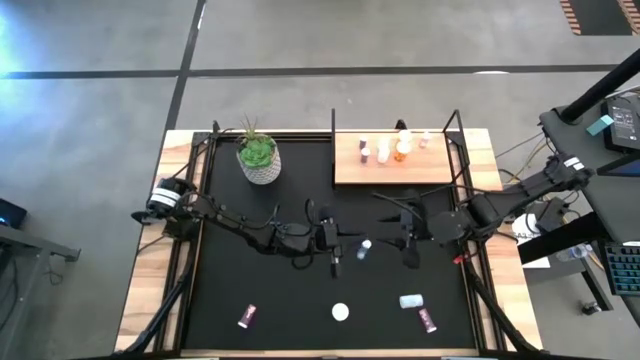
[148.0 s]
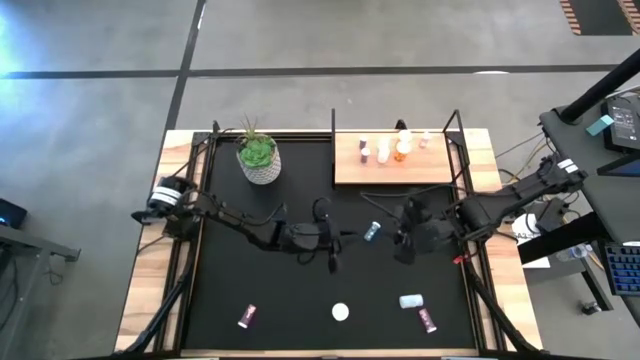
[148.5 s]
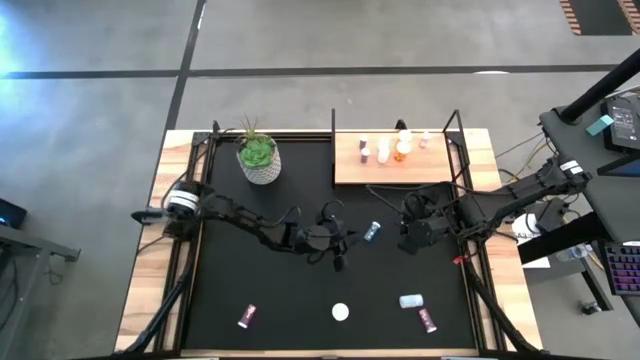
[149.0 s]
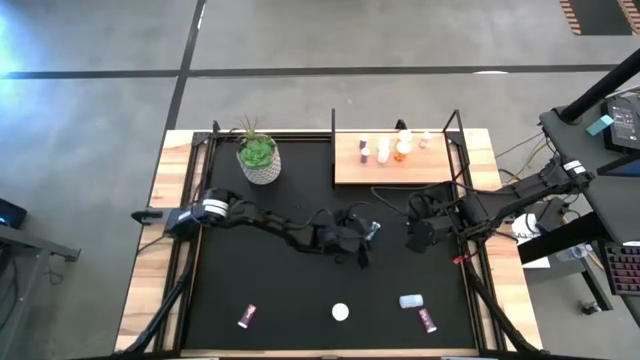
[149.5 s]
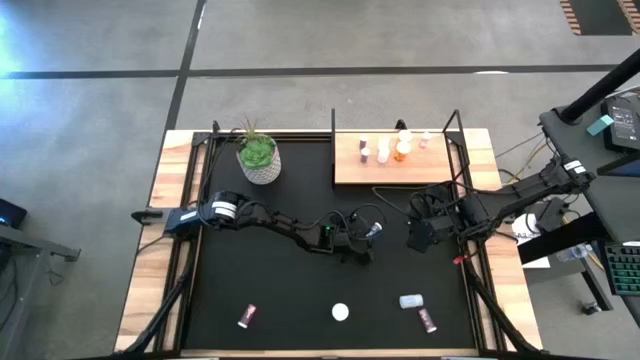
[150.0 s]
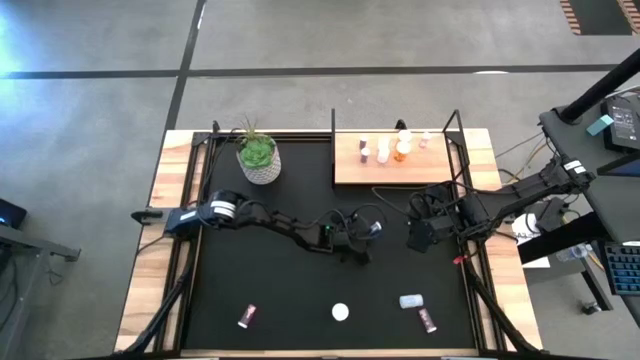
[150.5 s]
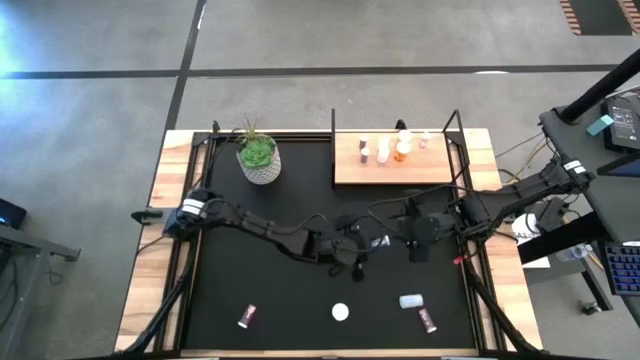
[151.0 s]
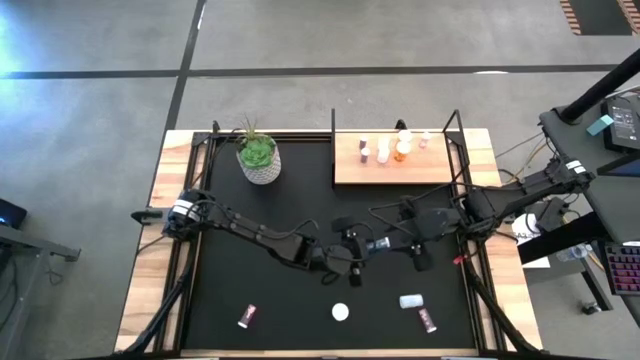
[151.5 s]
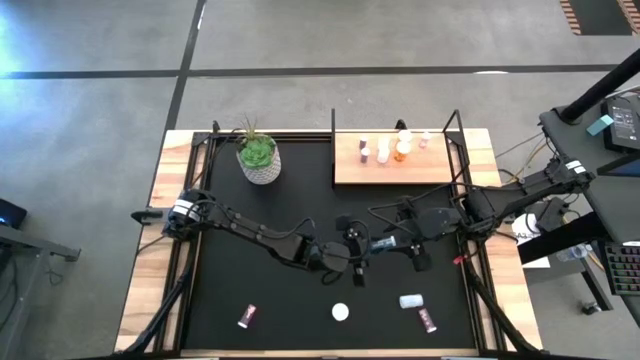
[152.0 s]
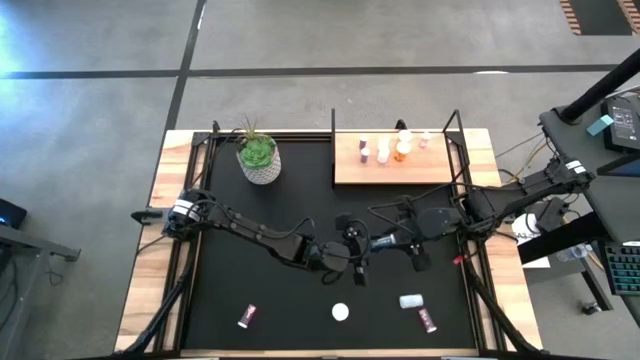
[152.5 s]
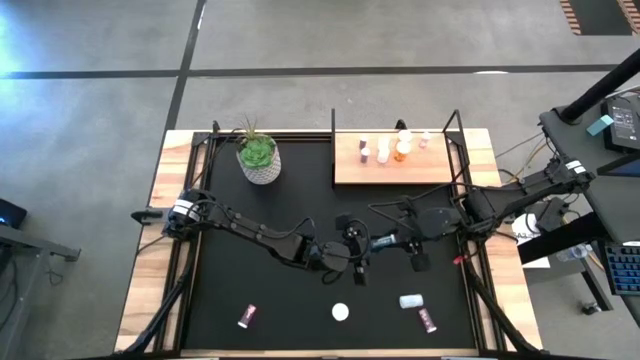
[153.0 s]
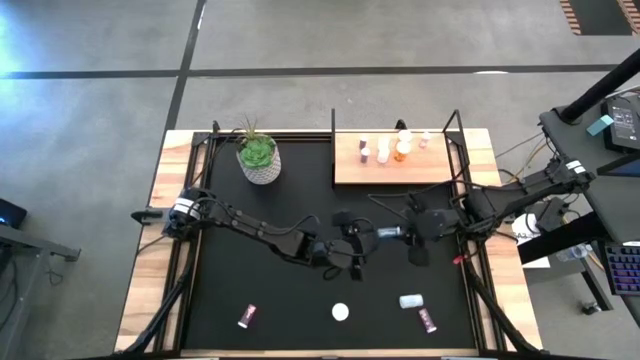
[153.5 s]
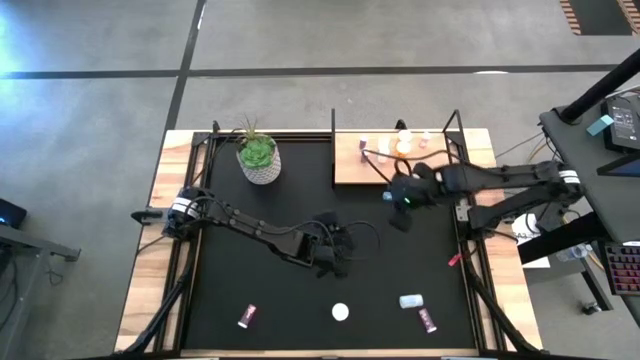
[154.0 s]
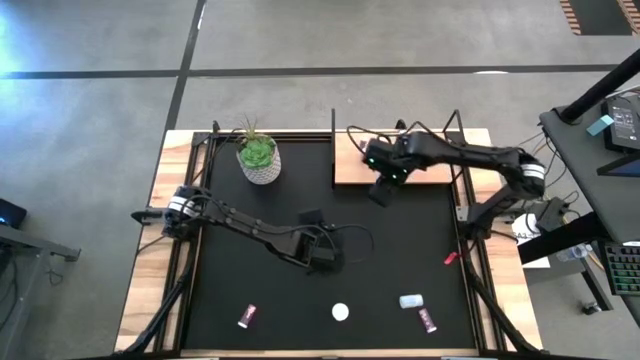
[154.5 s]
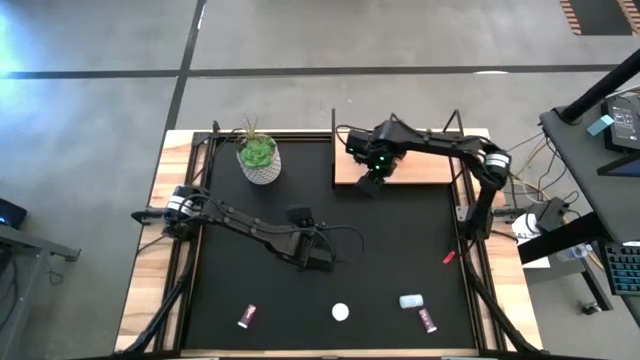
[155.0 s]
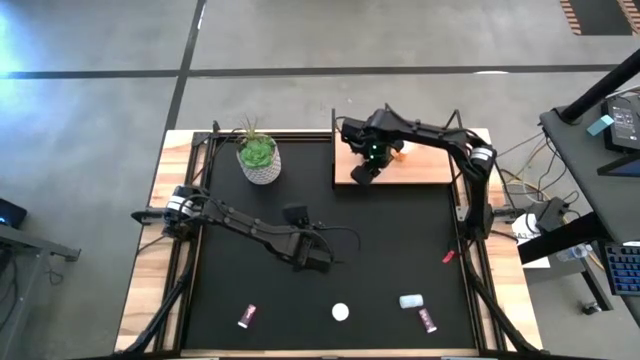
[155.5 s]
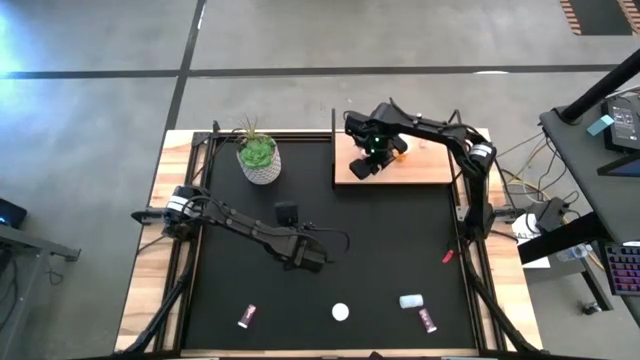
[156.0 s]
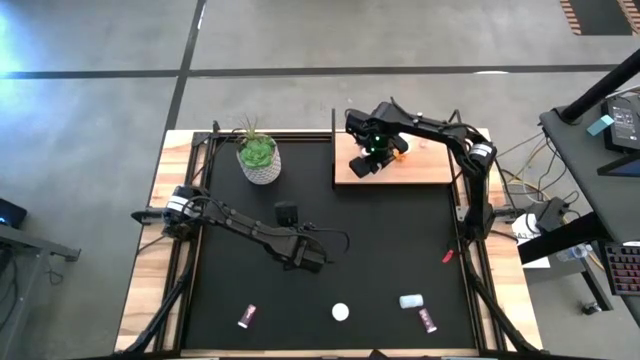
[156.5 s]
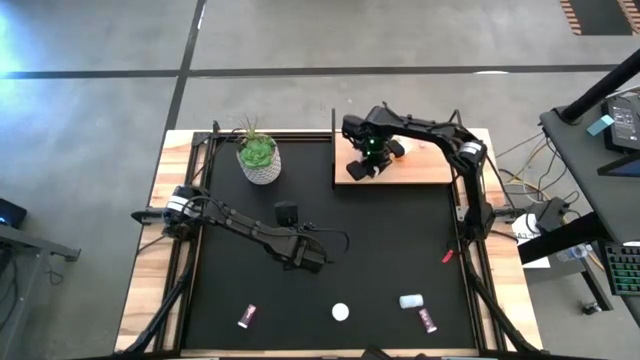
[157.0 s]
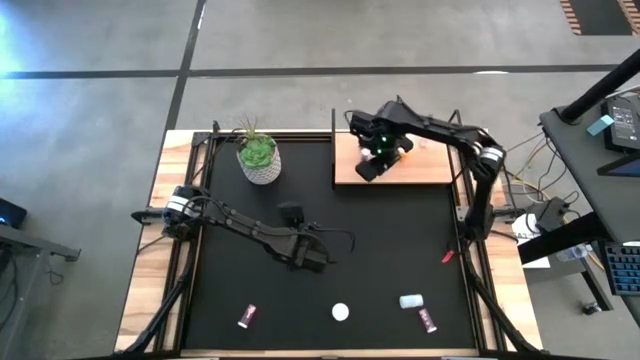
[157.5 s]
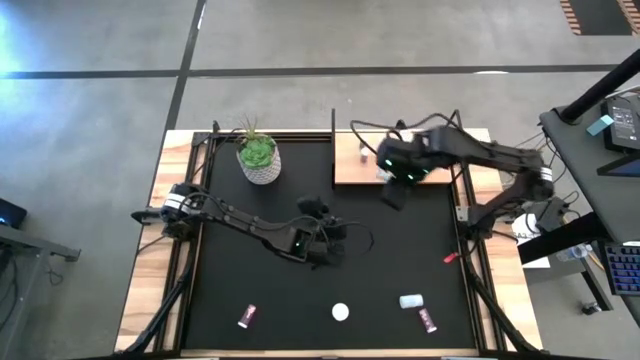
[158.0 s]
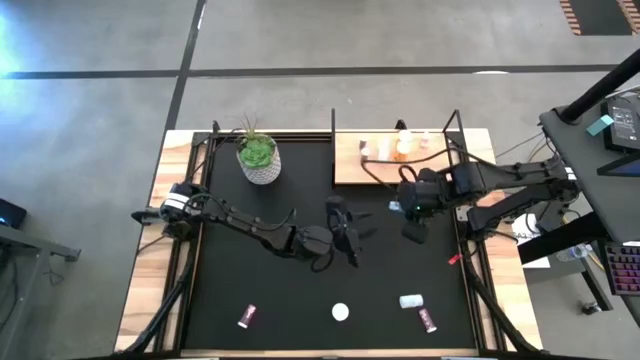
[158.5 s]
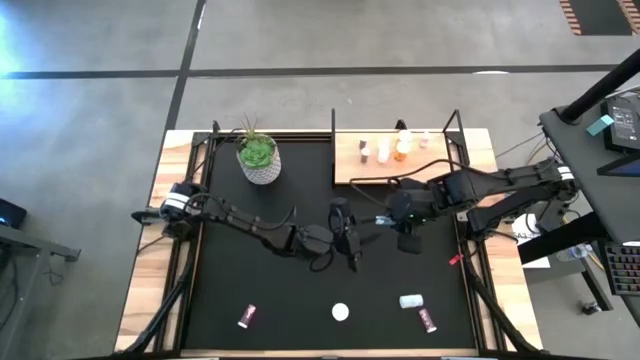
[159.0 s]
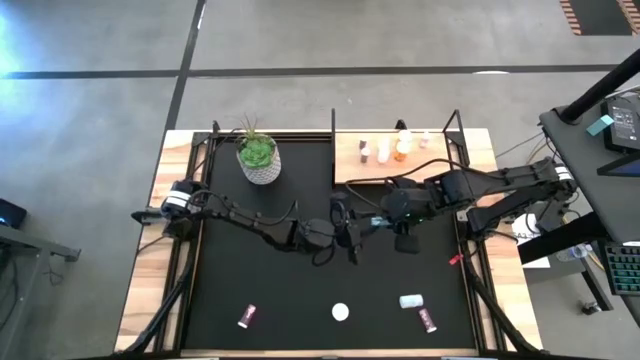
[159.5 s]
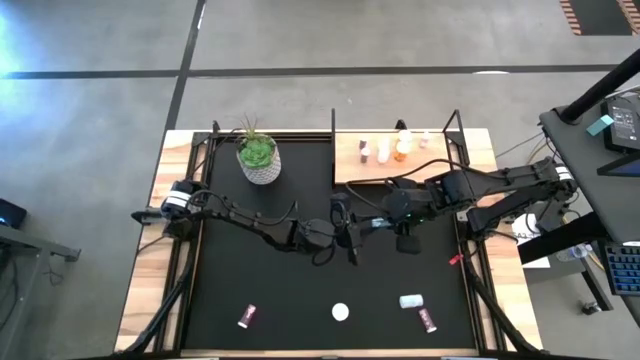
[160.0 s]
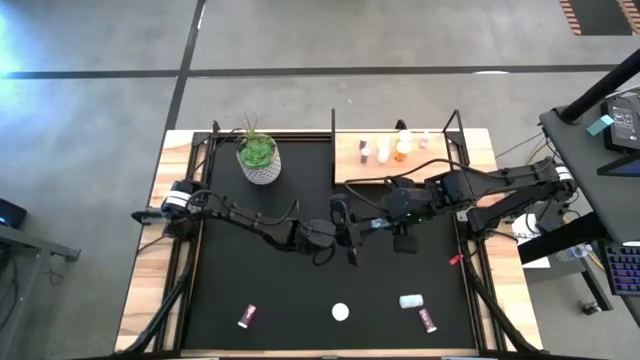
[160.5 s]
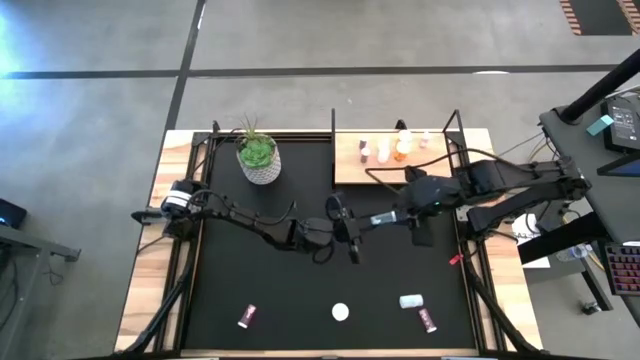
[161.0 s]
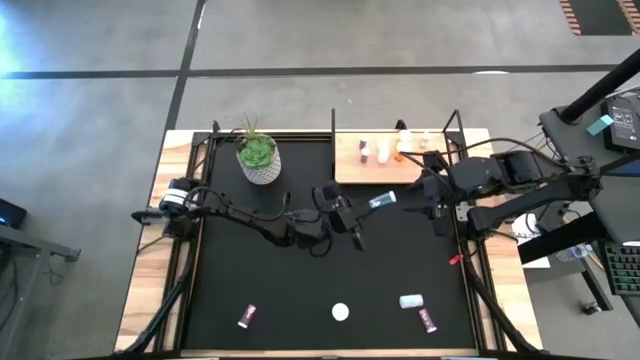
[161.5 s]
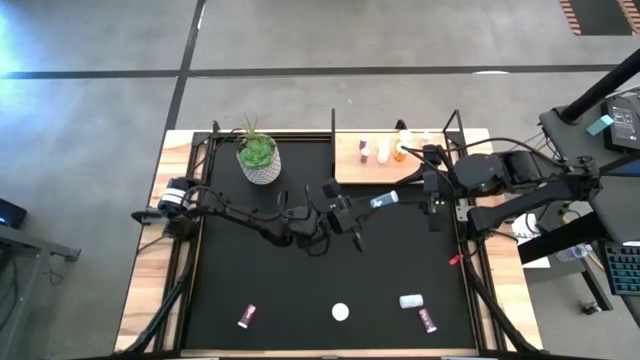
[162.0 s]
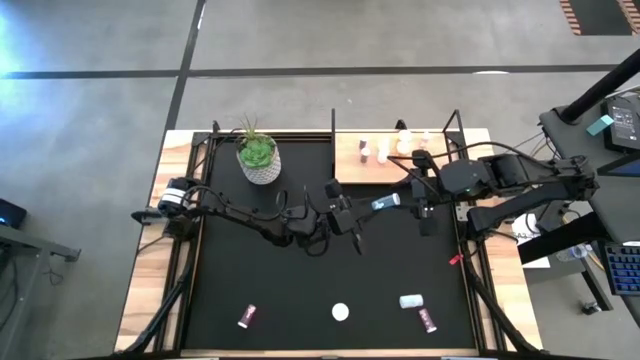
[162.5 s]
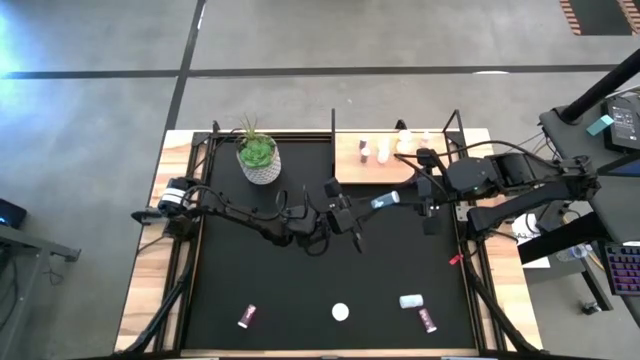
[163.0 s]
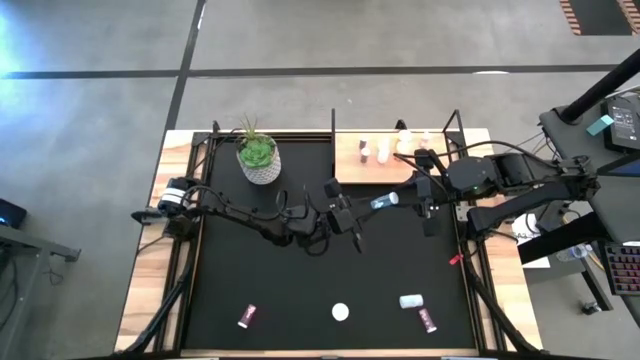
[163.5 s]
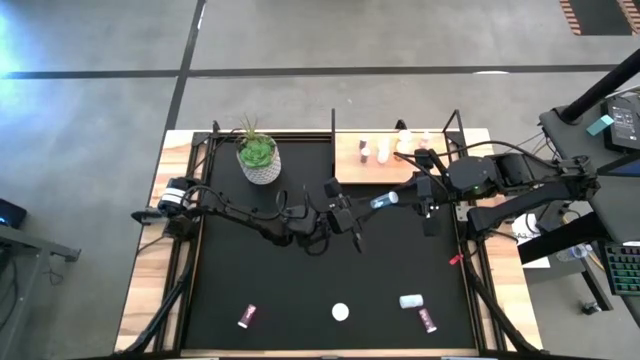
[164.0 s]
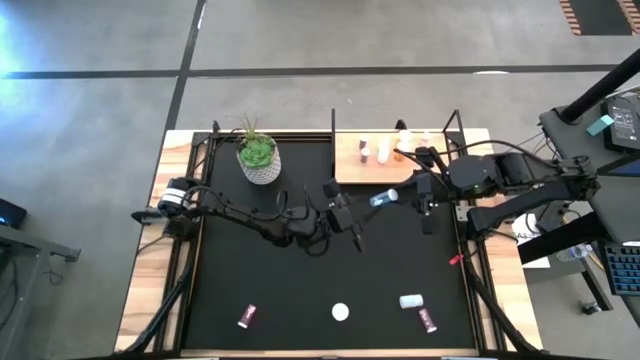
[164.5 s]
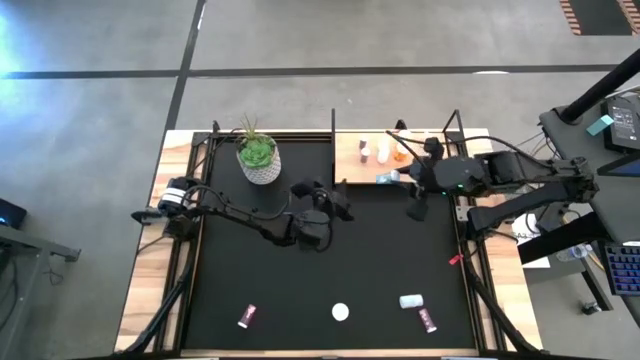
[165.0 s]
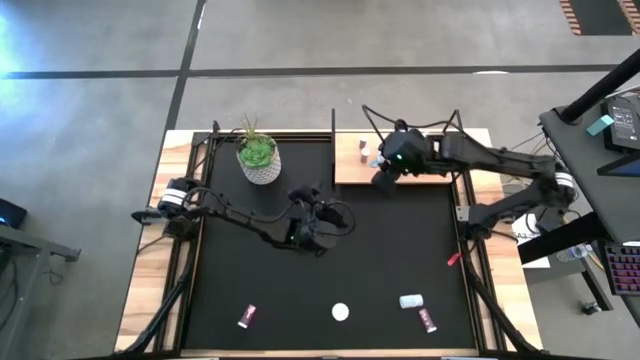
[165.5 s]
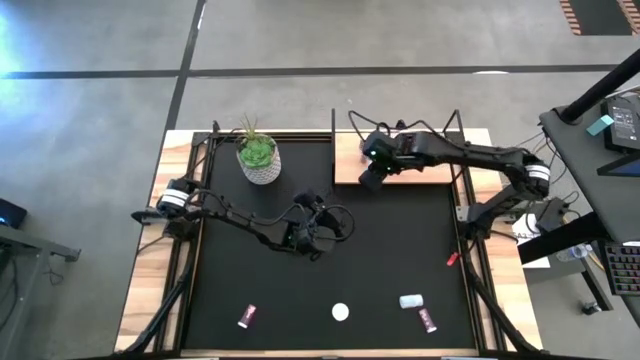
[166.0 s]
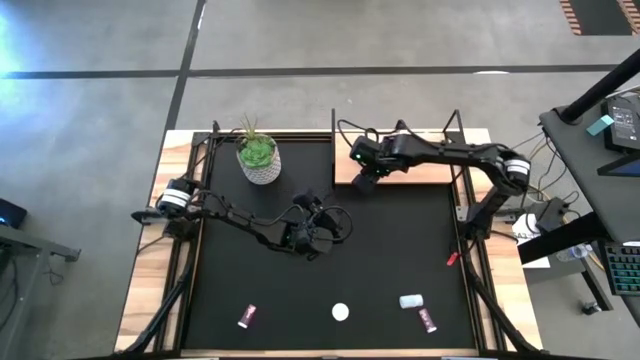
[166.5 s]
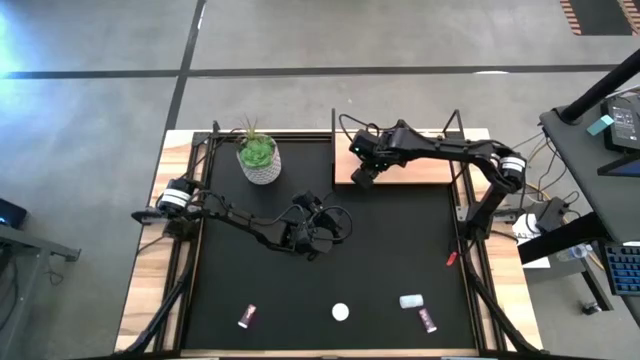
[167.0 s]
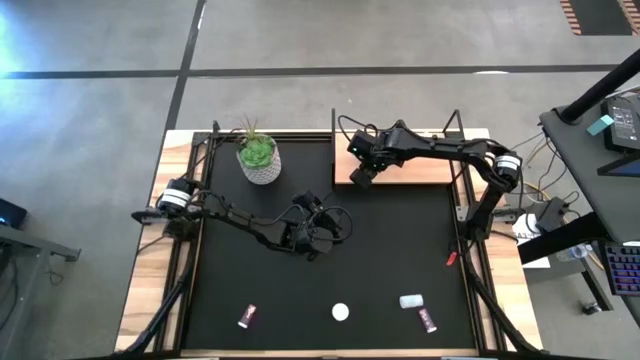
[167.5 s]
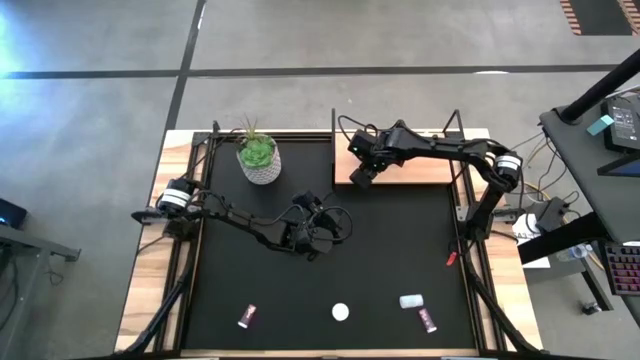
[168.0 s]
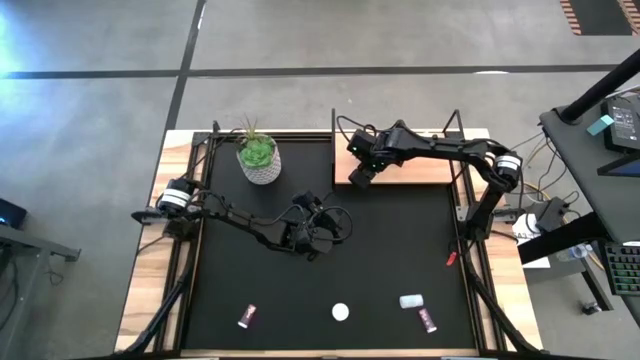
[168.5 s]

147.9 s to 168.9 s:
Task: Pick and place medicine bottles onto shelf by color
Put the blue pill bottle on the shelf aligned with the other blue pill bottles
